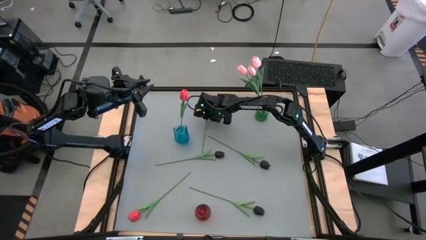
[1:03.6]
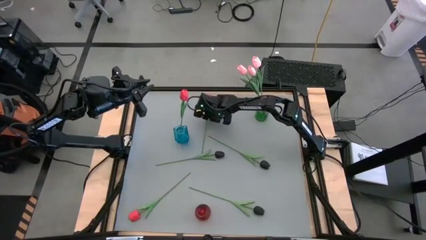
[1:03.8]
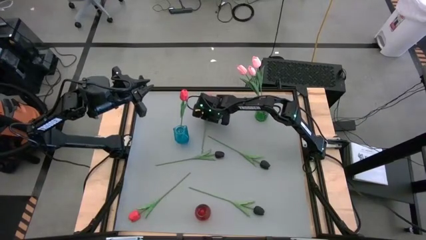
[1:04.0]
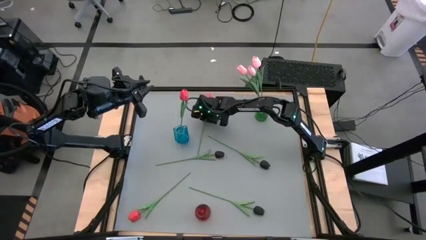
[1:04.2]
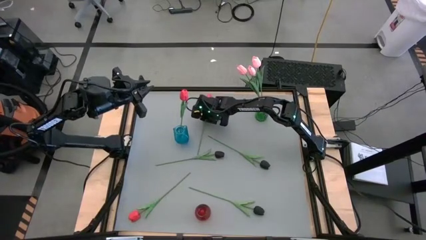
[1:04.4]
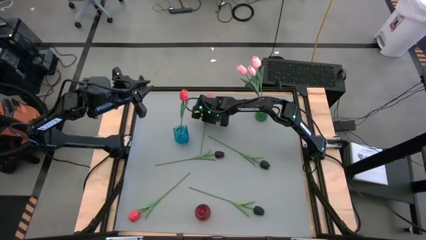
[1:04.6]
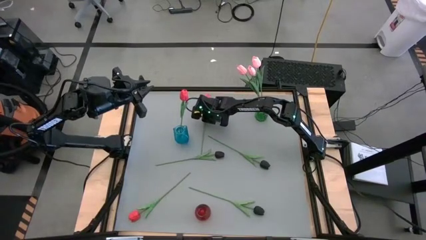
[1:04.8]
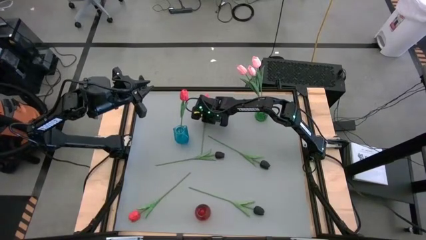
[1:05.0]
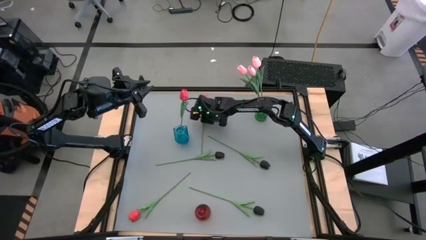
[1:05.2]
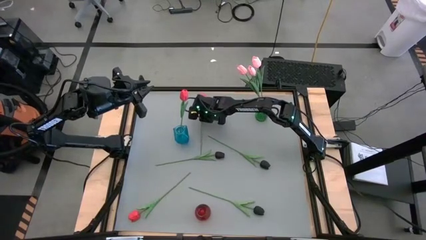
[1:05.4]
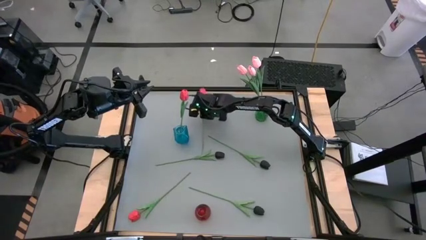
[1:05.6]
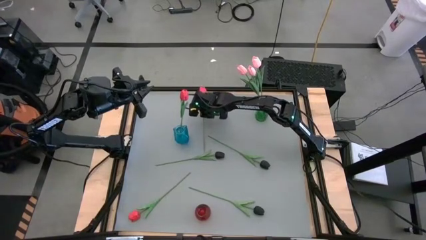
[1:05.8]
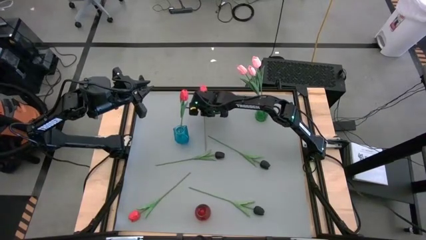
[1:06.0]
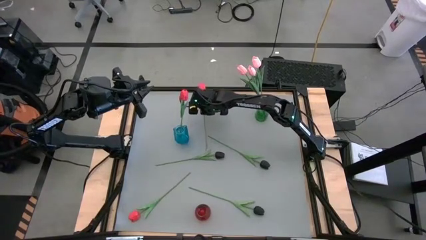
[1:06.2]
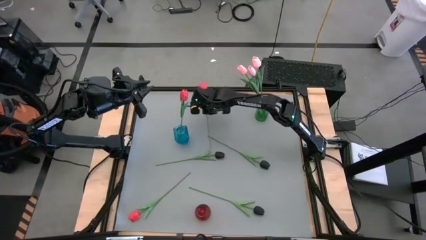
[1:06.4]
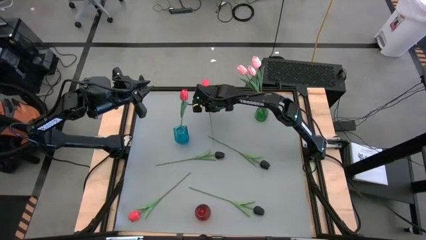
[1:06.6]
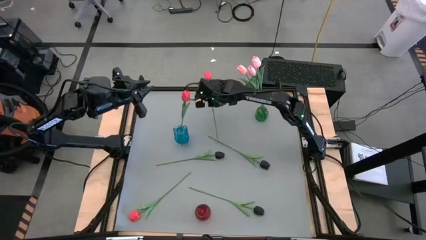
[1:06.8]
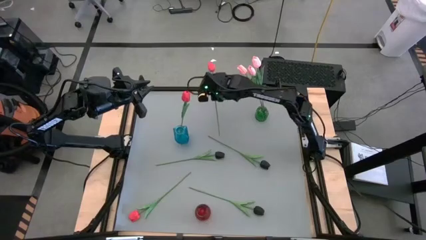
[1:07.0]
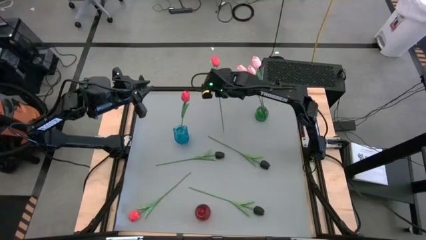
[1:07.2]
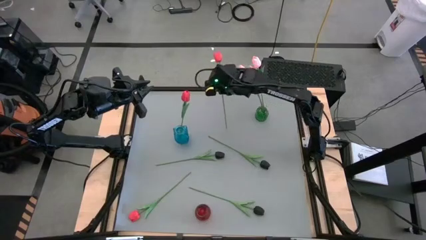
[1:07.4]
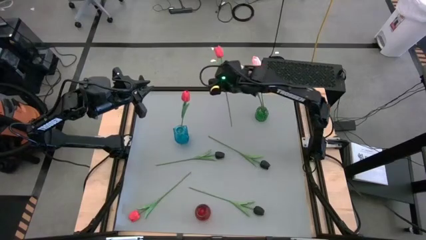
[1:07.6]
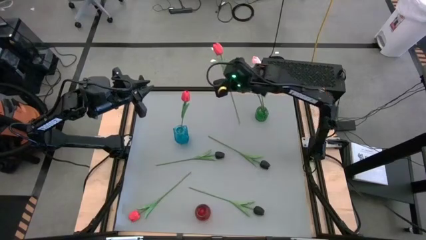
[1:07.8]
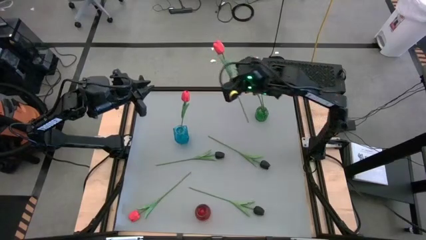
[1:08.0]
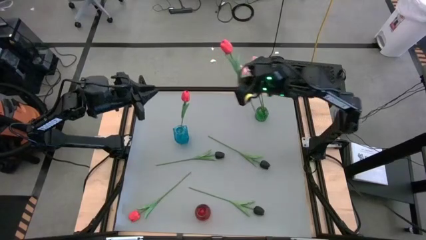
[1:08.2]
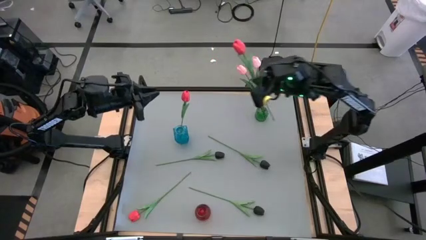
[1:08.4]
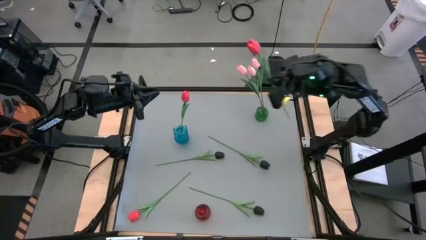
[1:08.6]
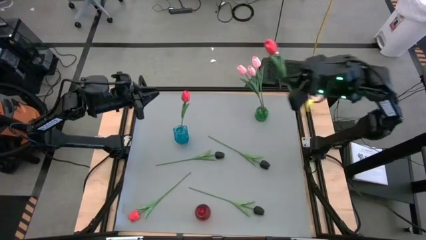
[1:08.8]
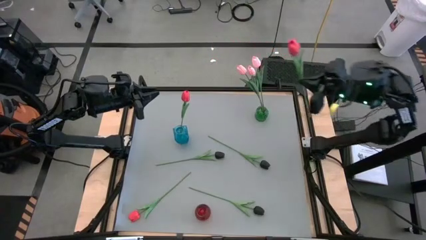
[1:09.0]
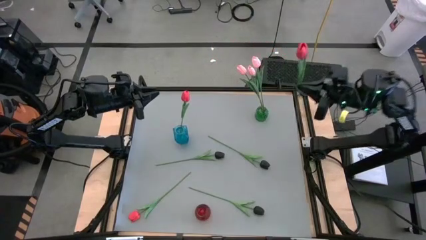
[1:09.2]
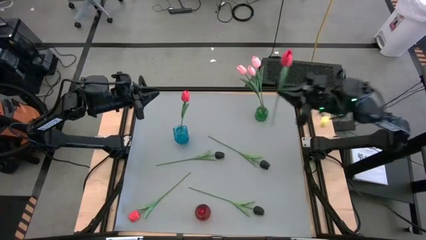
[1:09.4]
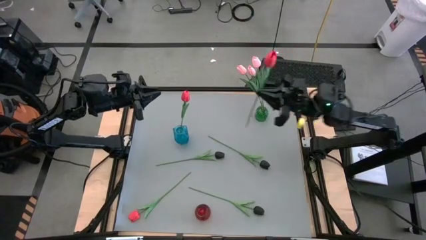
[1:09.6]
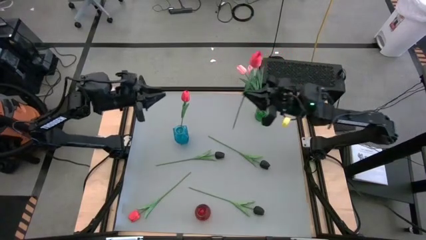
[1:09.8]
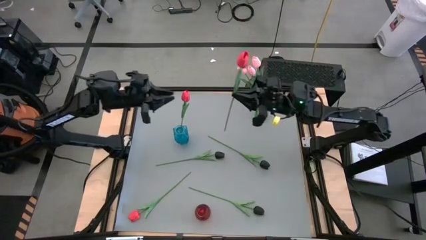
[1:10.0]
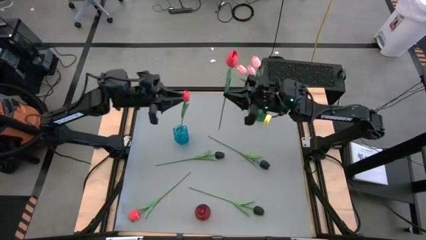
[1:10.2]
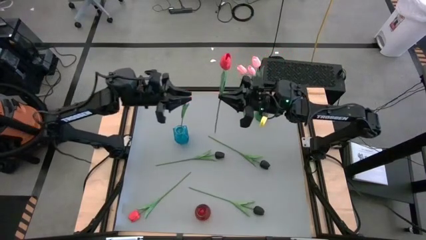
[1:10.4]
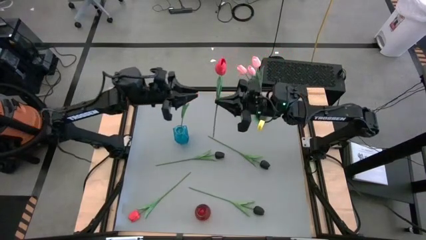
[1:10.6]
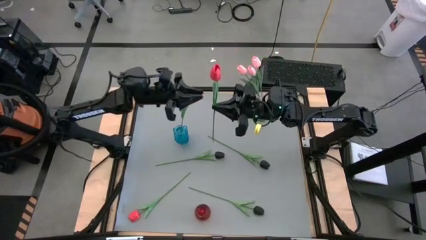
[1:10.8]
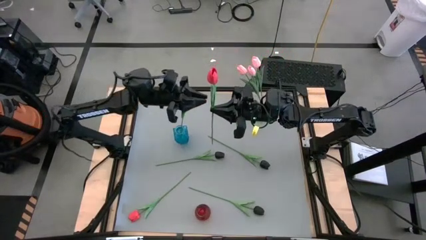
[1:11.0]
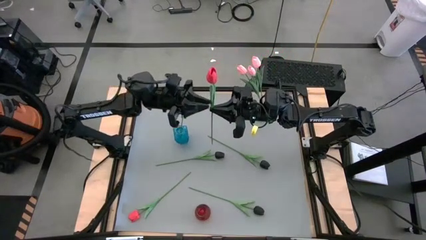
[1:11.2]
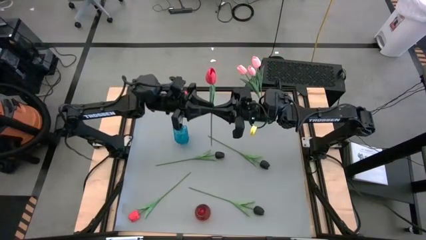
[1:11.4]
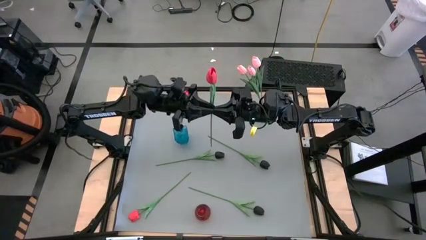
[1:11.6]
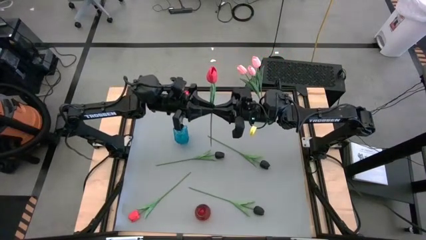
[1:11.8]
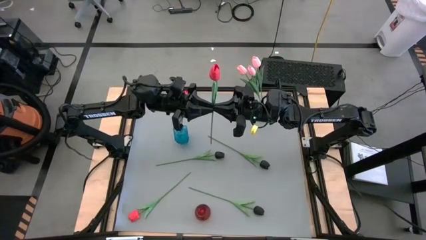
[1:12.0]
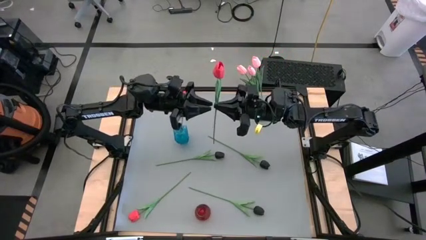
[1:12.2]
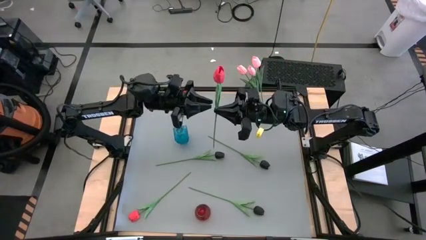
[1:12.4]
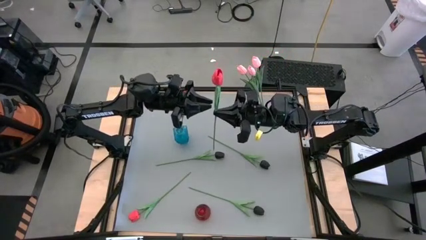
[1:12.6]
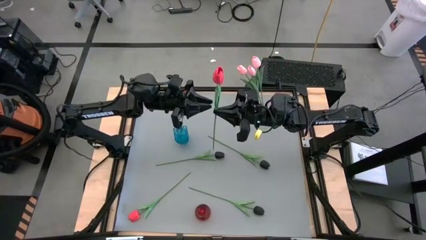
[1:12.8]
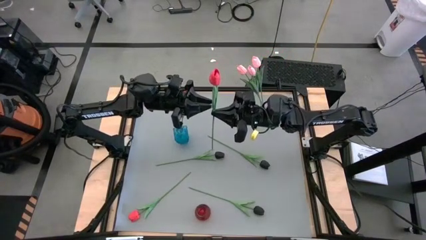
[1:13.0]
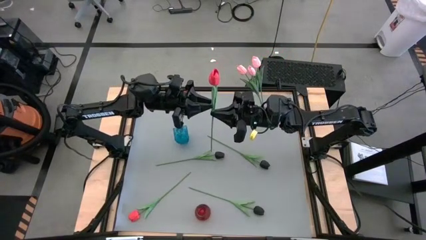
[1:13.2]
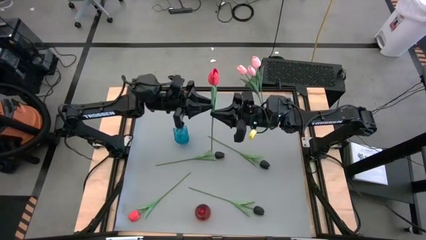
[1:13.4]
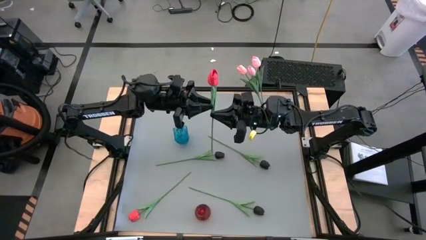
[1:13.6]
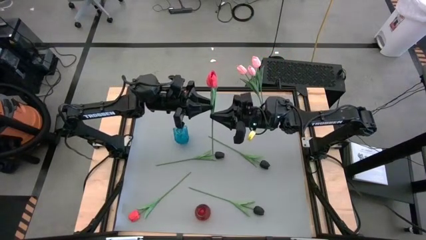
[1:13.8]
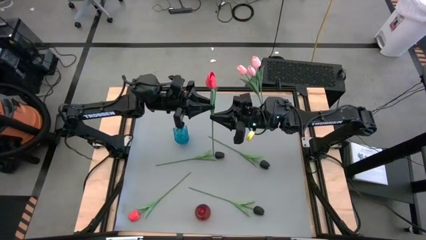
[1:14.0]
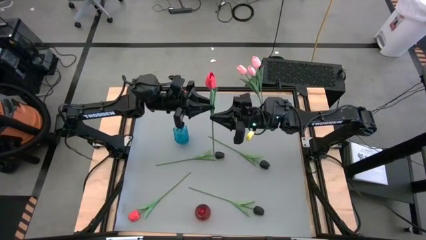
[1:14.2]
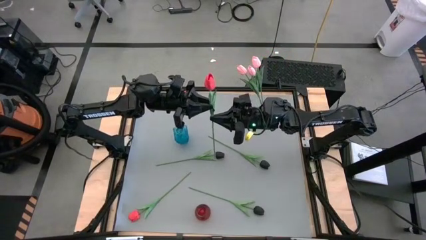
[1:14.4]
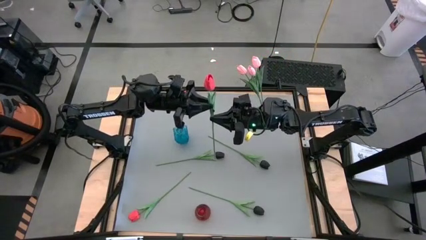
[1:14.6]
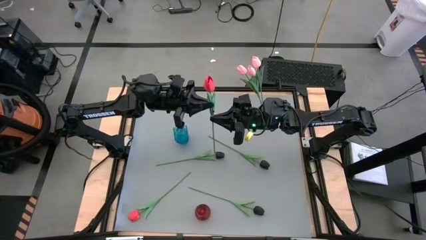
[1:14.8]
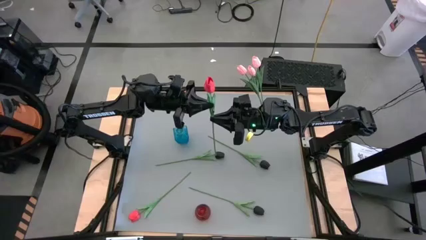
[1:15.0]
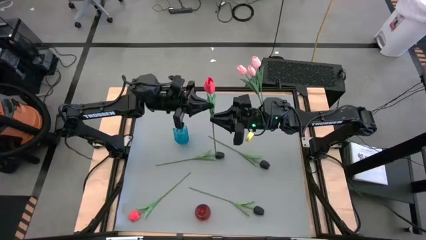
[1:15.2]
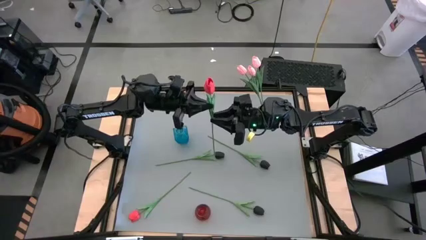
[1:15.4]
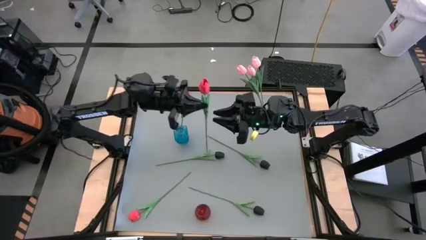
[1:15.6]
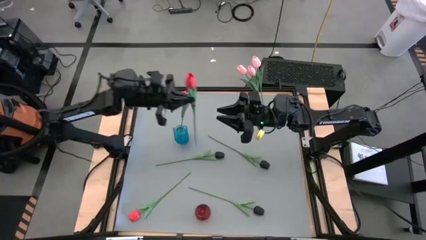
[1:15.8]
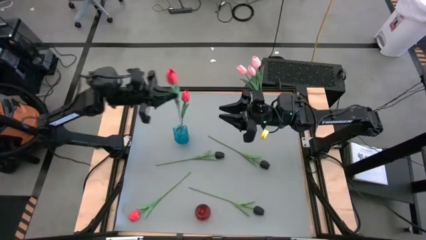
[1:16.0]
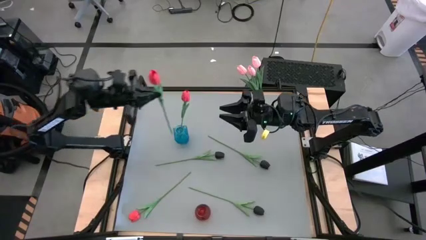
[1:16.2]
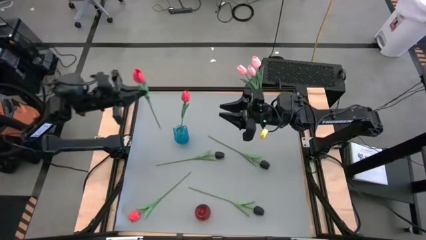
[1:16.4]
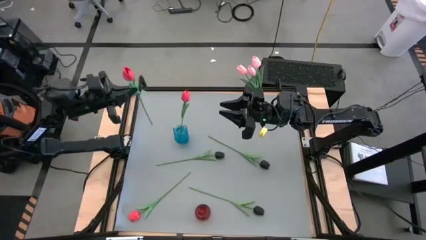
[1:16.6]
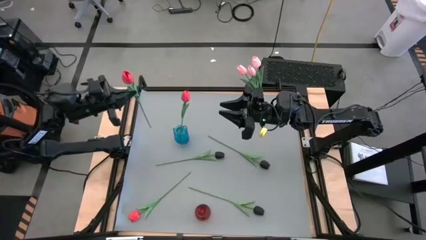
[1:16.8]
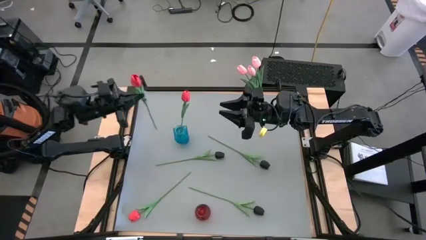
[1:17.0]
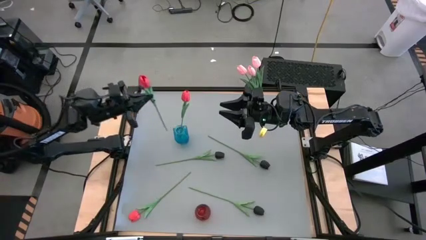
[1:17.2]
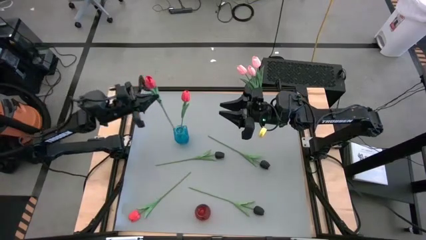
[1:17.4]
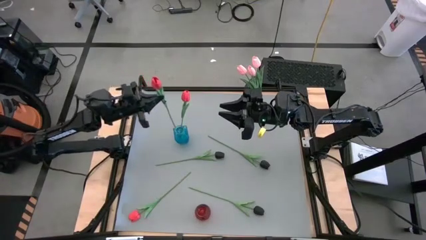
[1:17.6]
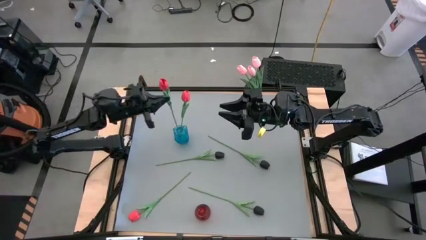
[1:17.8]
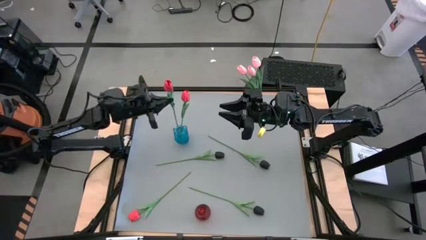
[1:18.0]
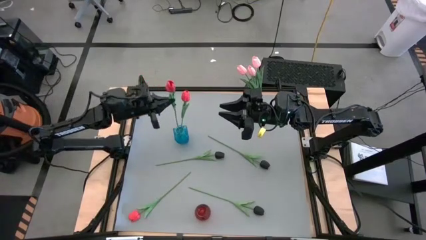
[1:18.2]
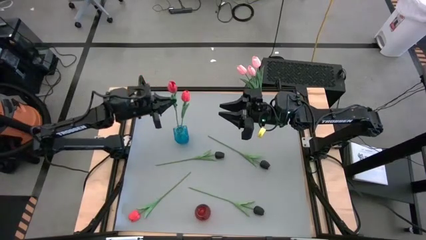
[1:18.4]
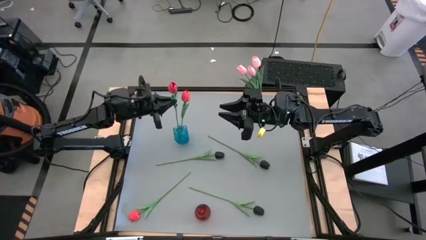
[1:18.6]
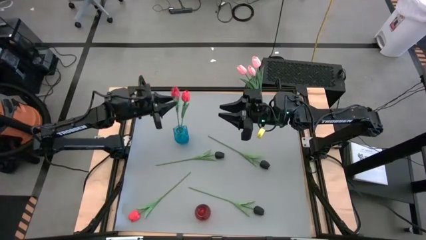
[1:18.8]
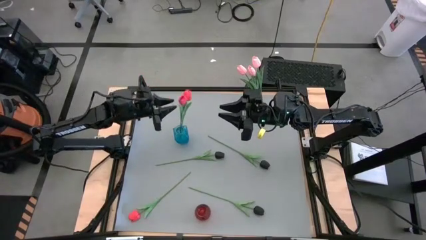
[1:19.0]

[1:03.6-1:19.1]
Task: Sort flowers into vase by color
Put the top red flower into the blue vase

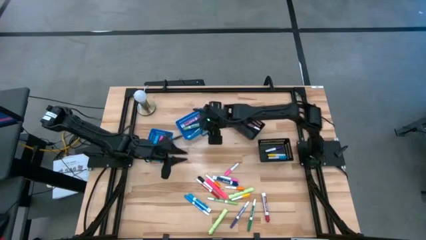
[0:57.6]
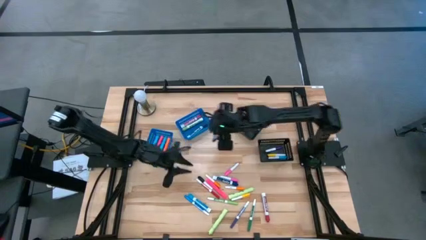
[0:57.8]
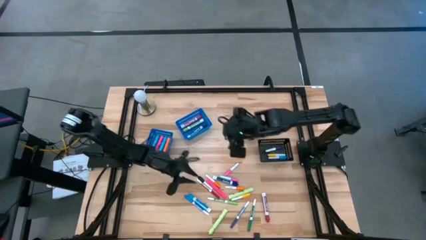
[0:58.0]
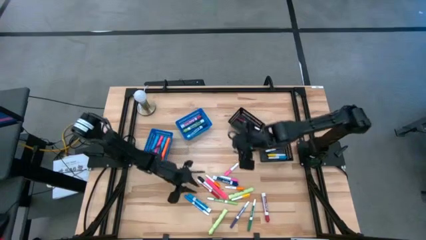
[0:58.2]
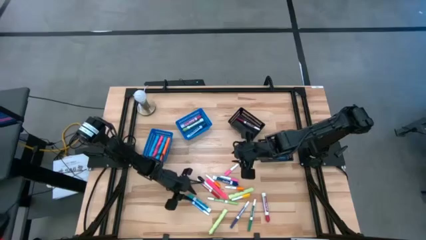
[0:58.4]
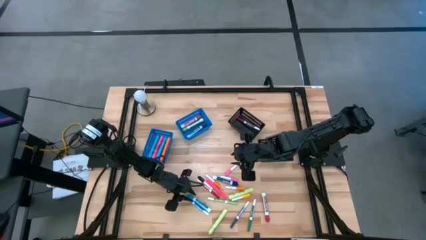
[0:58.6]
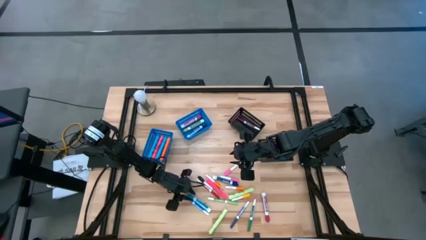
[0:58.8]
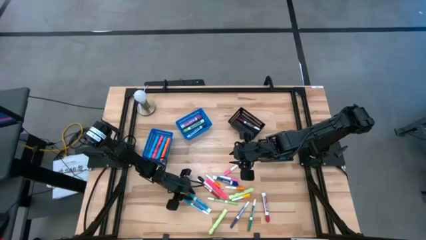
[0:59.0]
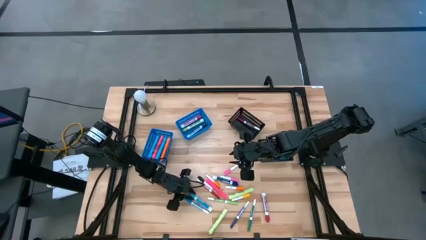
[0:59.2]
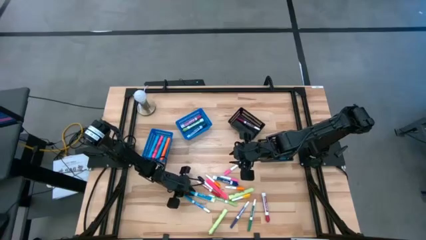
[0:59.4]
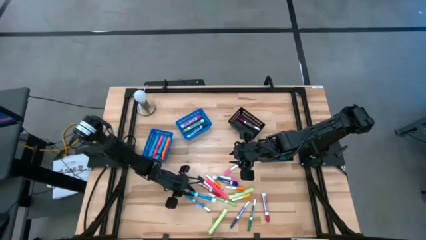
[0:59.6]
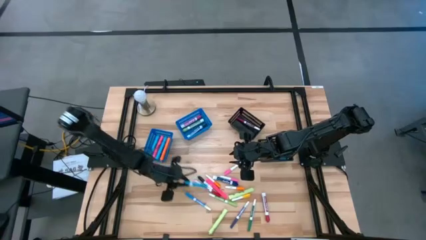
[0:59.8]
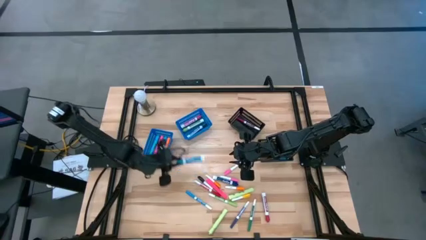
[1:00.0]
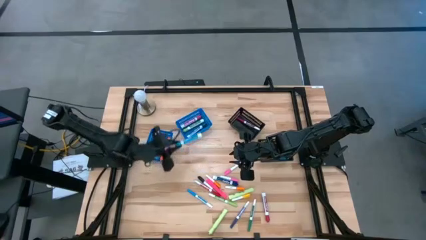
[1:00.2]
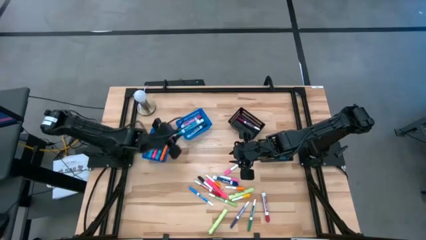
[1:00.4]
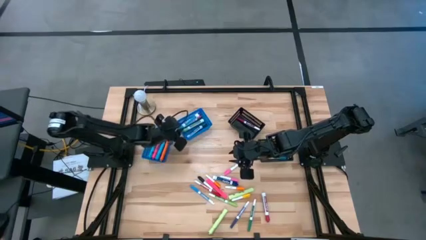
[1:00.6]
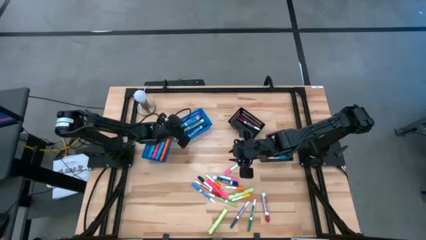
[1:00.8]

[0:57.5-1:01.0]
Task: Pick & Place Markers
Put the light blue marker pen into the right blue bin
